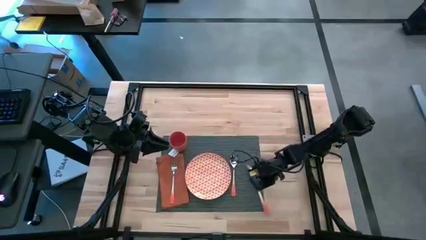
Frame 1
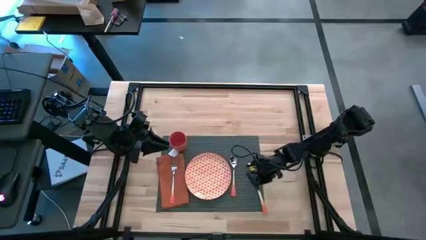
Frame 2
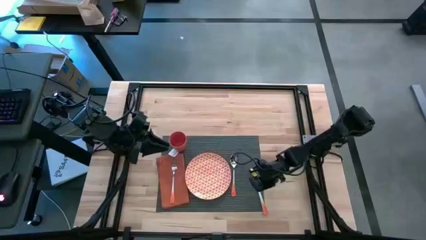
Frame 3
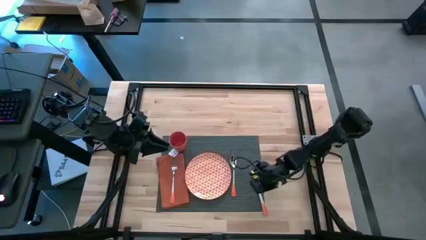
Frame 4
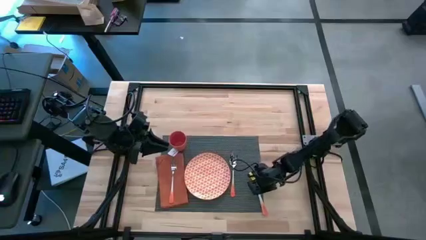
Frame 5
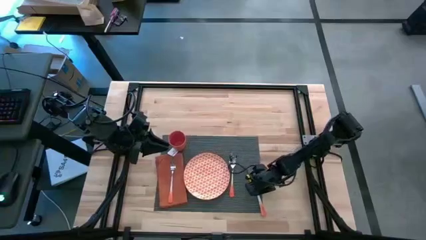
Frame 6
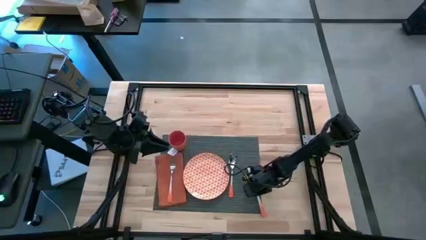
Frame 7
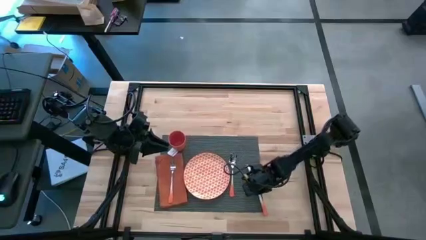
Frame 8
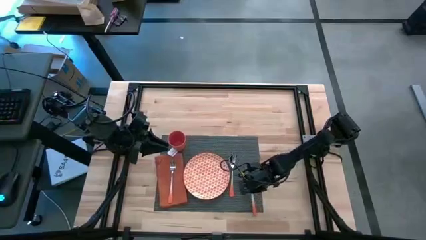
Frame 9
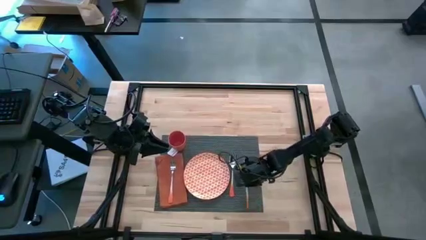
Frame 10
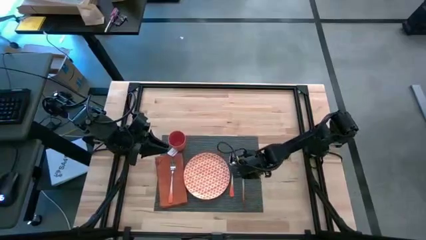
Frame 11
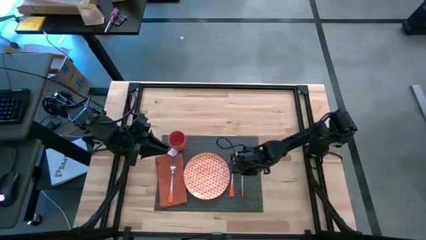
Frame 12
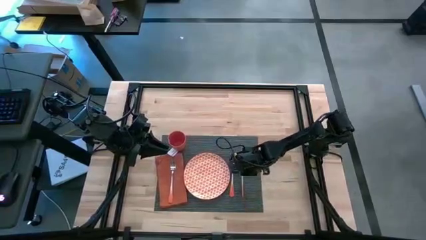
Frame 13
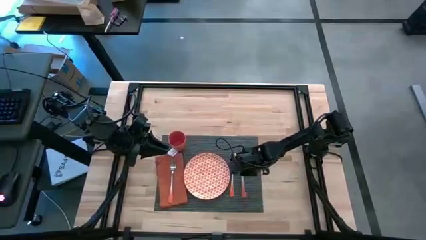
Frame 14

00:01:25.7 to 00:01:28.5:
Task: Set table place
Put the orange table knife on the gray tablemat to the right of the orange spoon

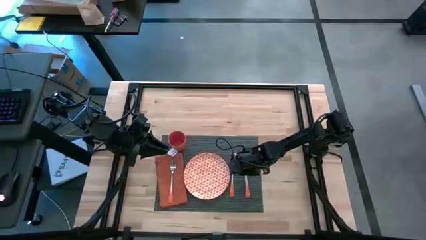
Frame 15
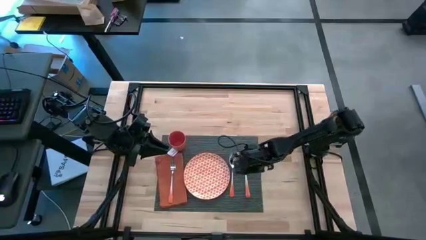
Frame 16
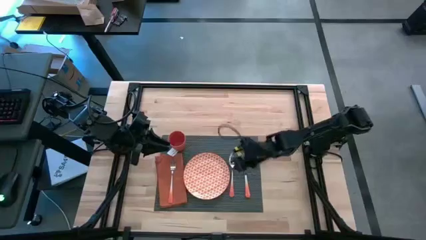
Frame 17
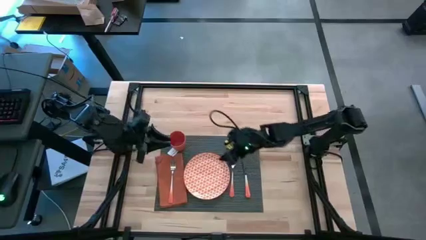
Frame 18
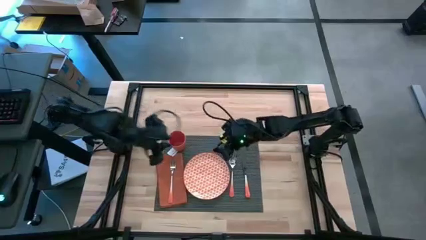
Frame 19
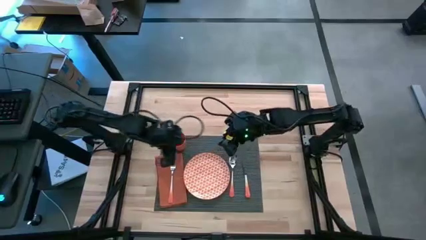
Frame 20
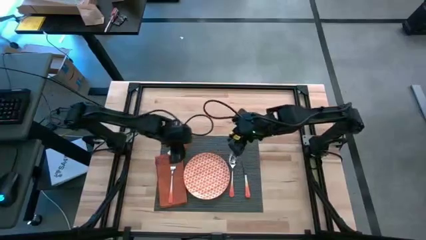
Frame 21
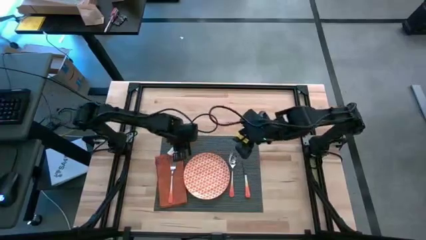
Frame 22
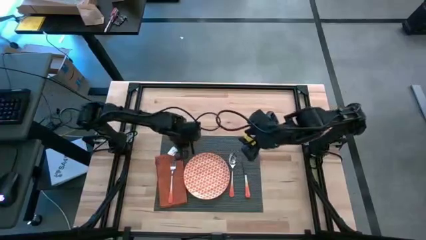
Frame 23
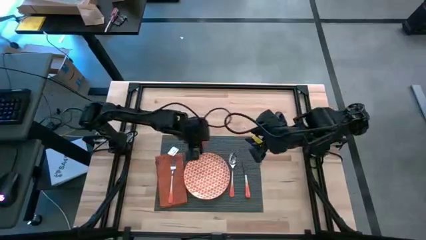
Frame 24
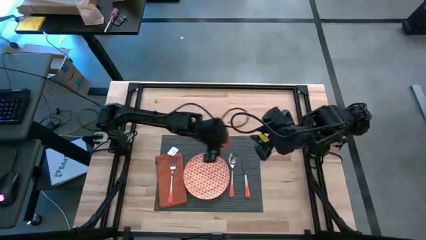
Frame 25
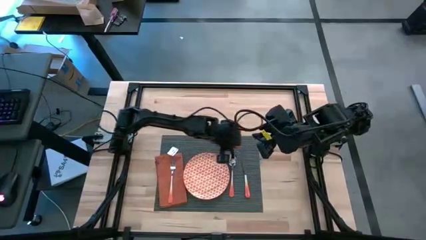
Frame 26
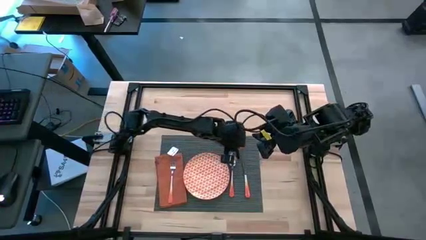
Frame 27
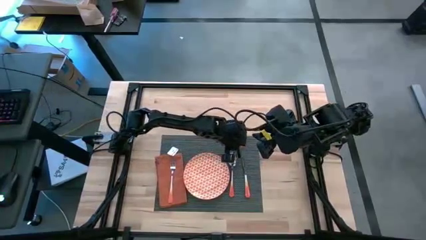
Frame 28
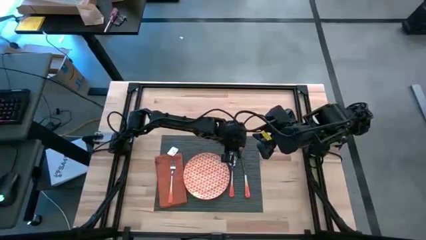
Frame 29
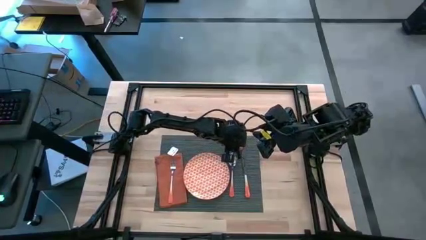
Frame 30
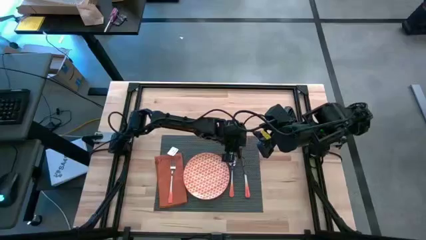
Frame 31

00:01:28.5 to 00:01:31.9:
Move the orange cup to the top of the silverware on the gray tablemat

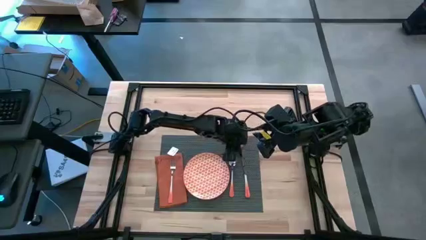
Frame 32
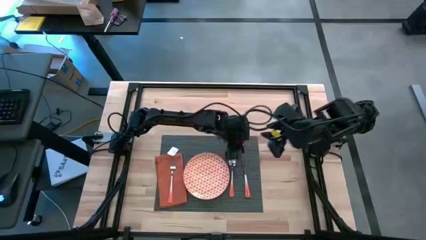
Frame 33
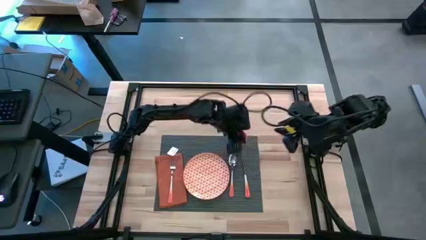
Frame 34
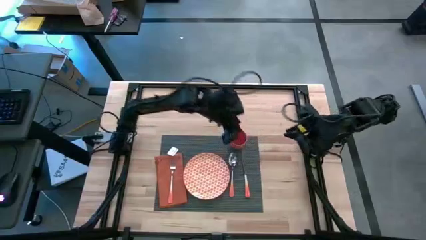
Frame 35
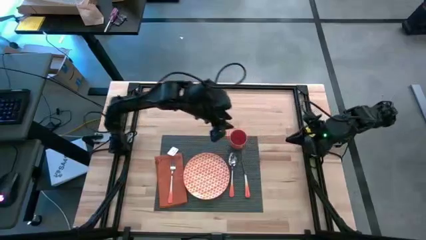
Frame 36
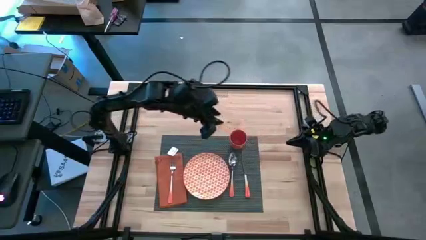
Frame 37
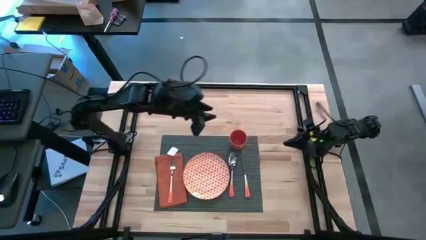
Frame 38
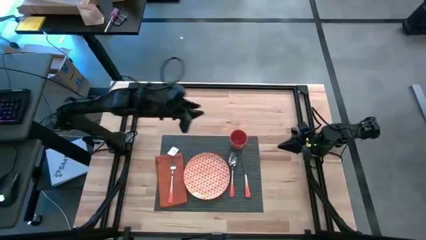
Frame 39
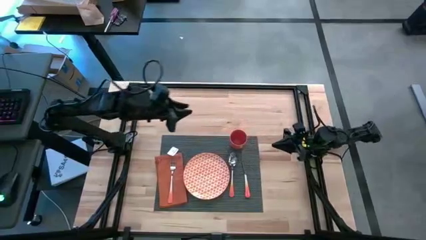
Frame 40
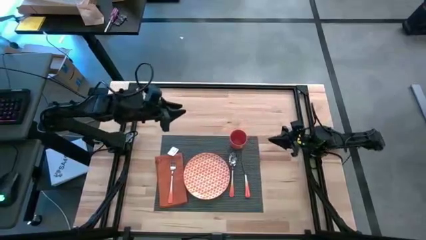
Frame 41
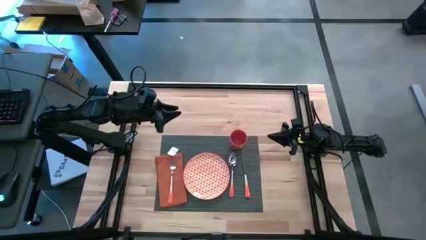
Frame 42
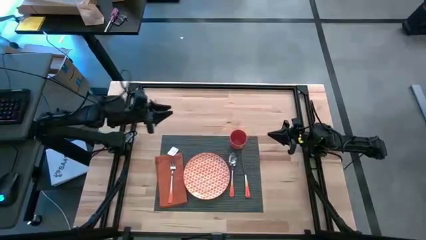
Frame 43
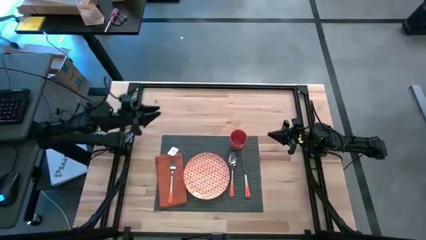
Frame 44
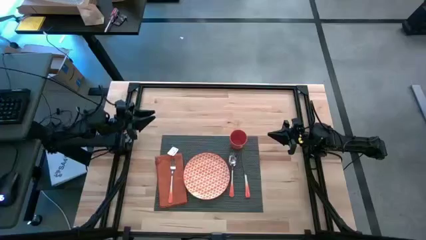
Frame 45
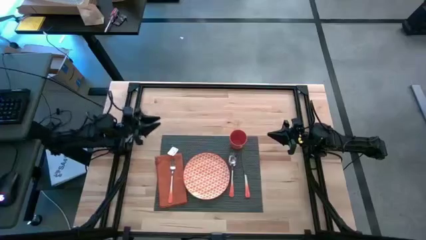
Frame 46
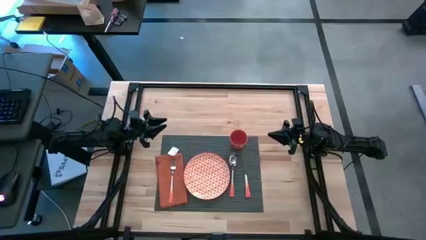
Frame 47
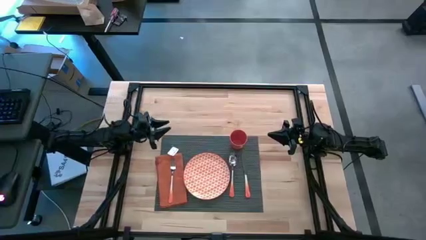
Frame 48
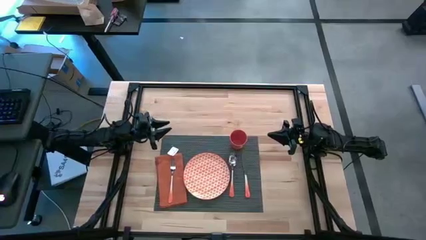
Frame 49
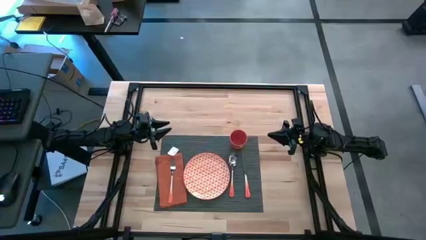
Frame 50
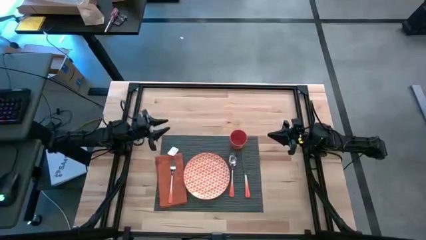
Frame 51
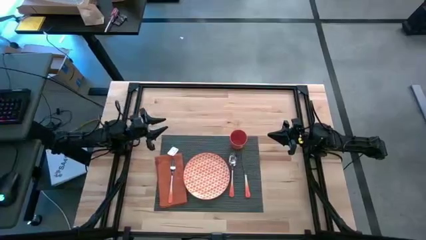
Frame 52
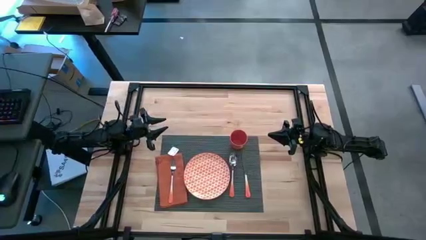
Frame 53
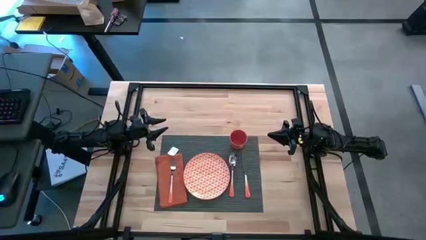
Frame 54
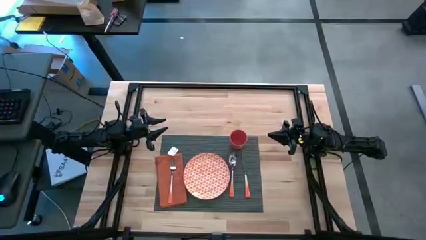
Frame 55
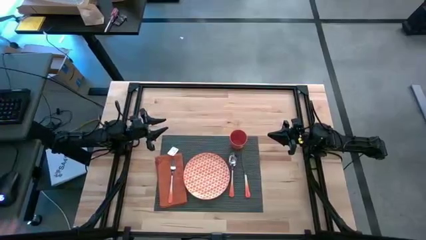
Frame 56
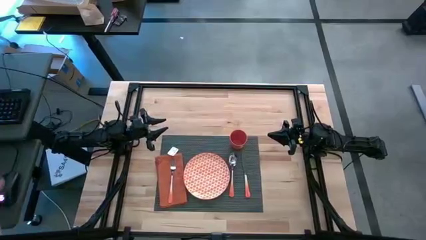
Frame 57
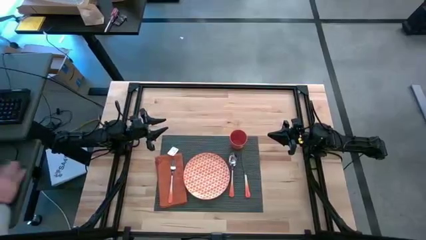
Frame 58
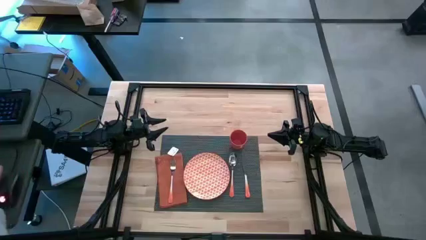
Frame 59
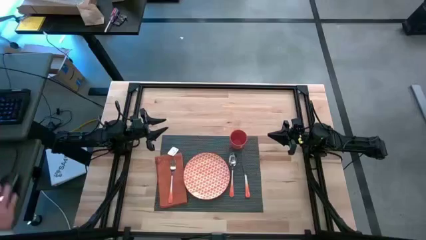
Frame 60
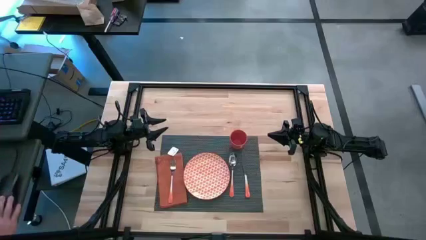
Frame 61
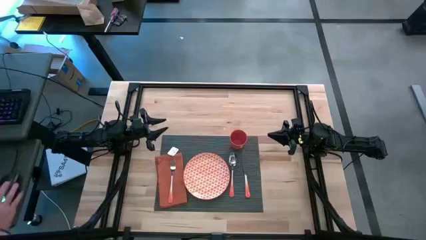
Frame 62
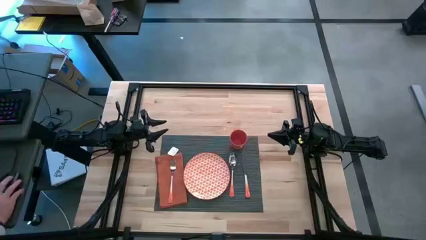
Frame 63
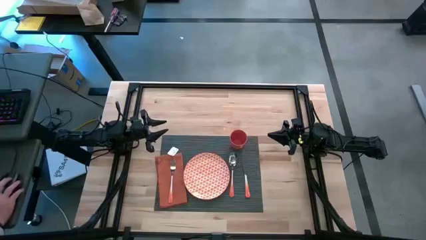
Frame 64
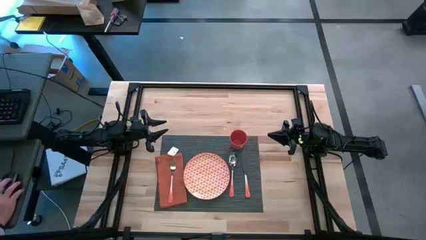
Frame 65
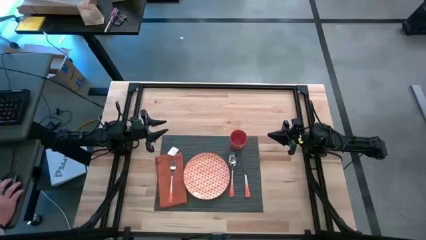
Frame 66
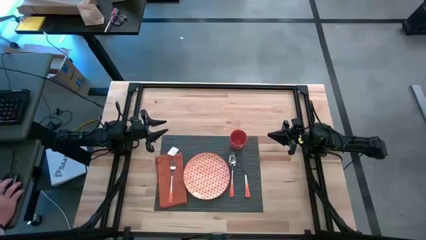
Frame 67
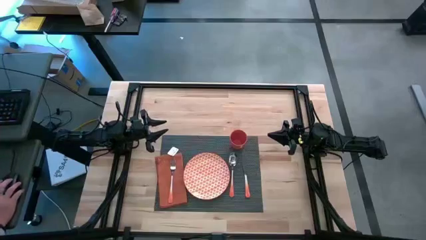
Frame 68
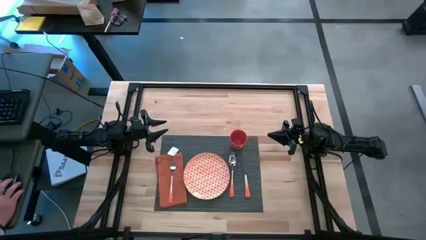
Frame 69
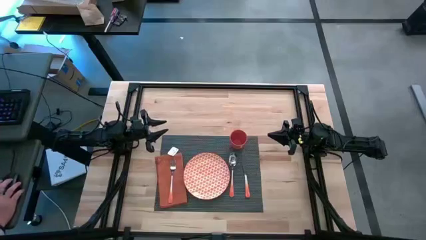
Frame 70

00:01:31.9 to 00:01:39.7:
Return to Home Position

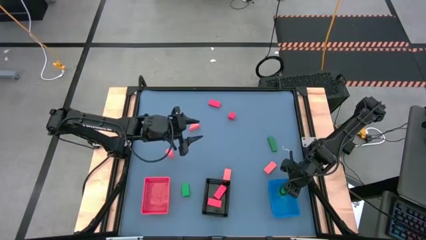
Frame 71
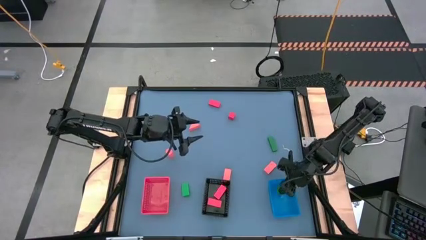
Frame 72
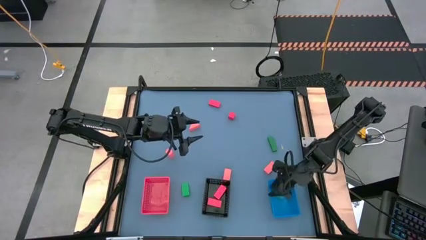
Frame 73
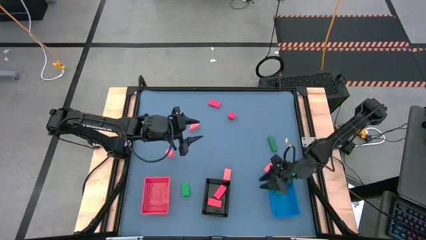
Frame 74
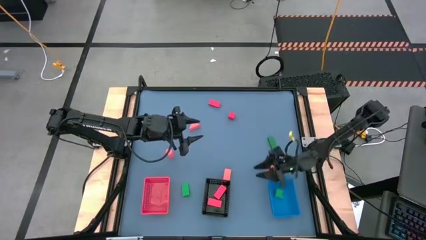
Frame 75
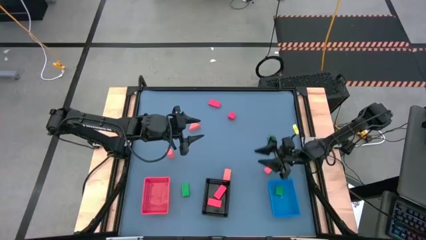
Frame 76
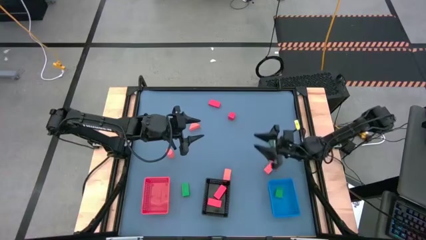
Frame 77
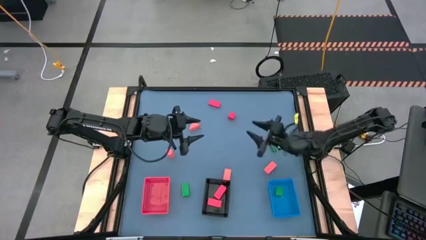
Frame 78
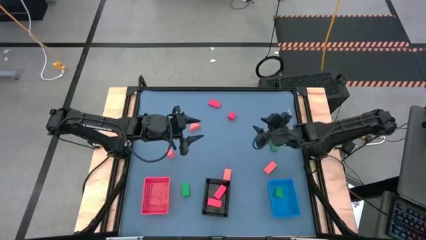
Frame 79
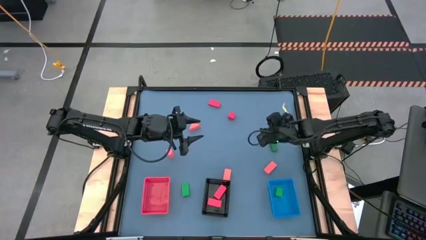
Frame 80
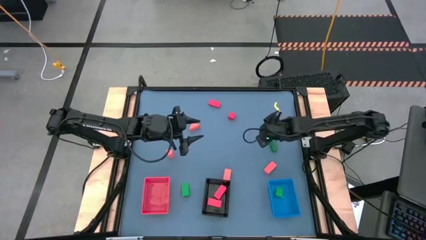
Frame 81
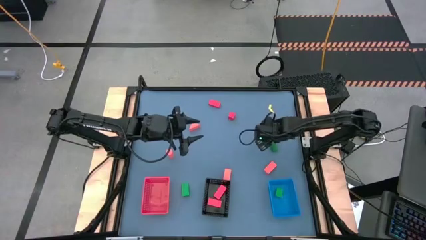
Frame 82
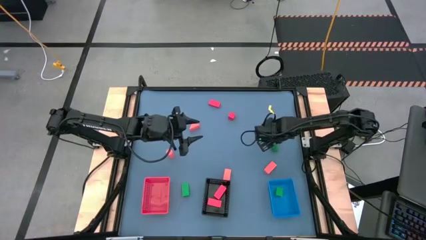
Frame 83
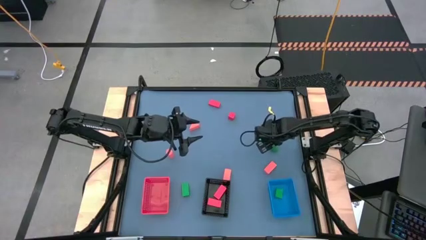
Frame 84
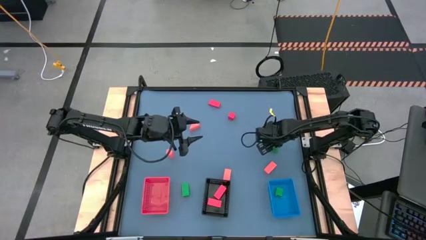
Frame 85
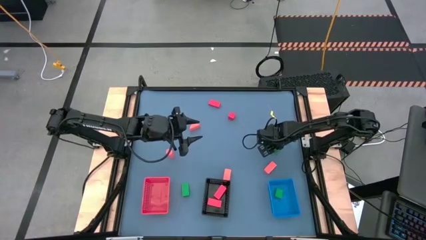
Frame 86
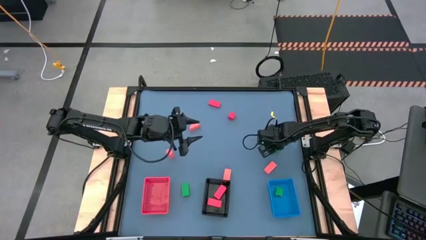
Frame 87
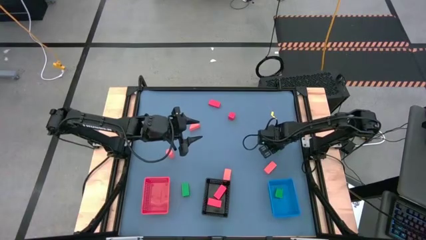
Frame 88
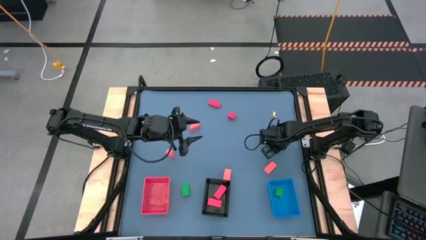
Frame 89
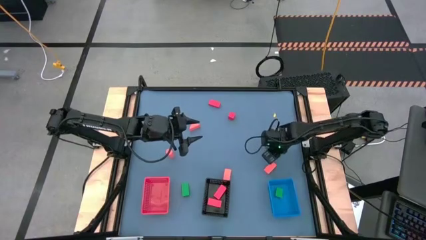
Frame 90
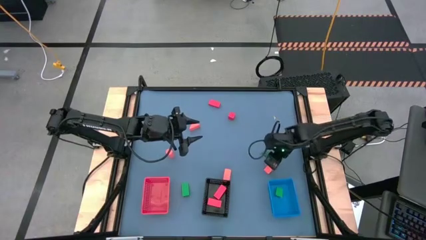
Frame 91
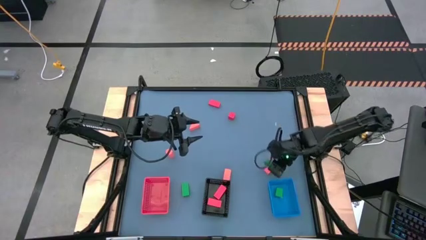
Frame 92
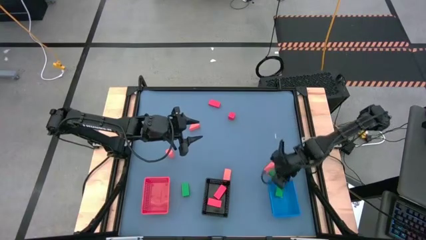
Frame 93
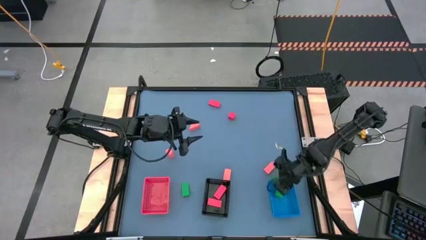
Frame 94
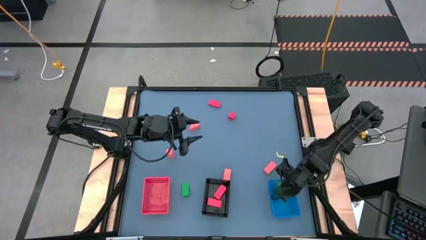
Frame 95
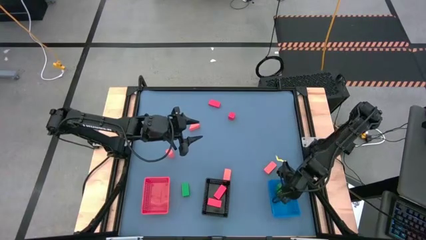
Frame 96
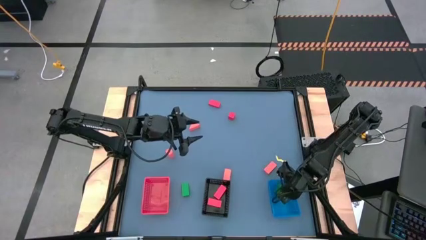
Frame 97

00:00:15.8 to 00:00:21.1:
Task: Sort & place blocks by color
Put the green block into the blue bin
